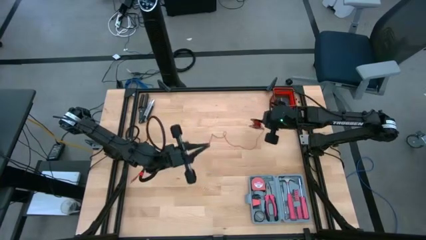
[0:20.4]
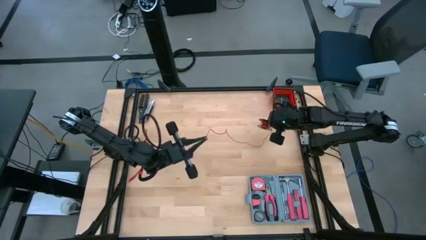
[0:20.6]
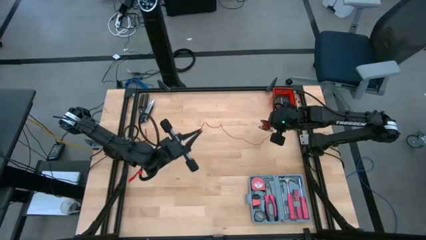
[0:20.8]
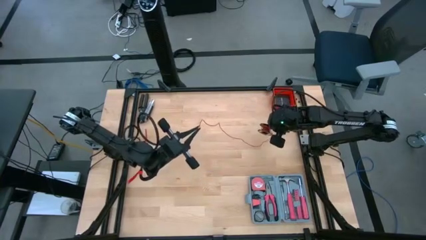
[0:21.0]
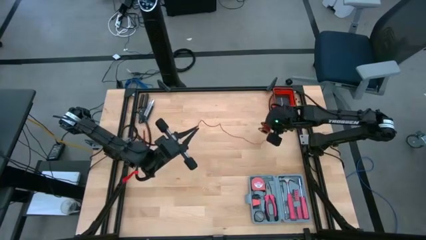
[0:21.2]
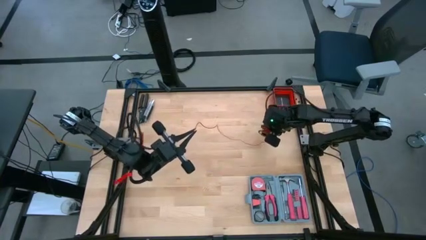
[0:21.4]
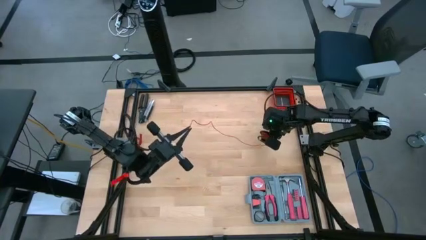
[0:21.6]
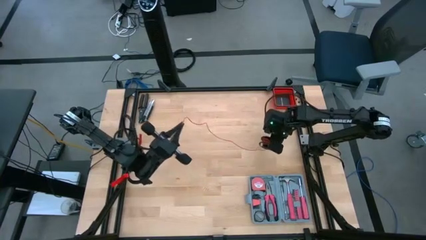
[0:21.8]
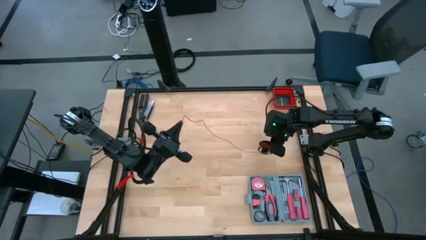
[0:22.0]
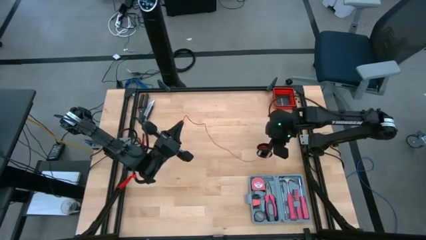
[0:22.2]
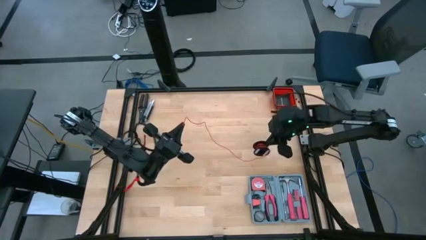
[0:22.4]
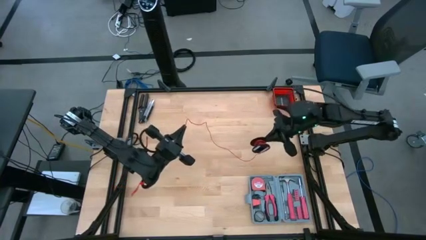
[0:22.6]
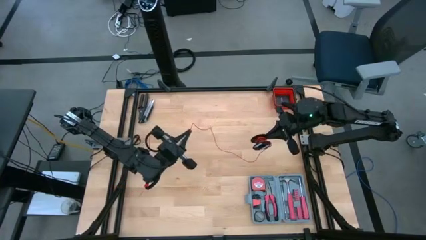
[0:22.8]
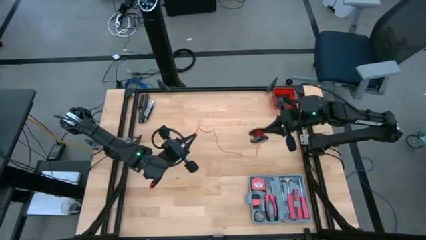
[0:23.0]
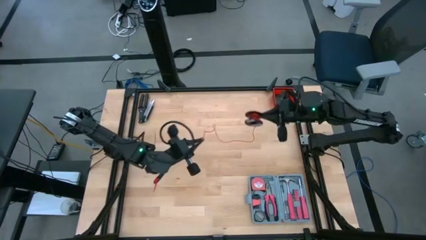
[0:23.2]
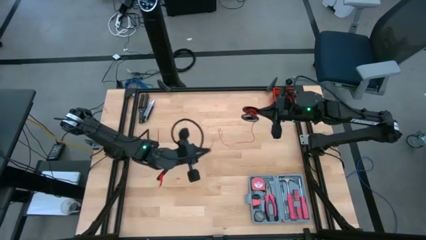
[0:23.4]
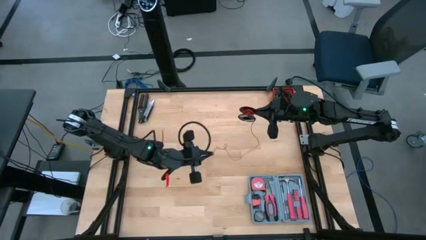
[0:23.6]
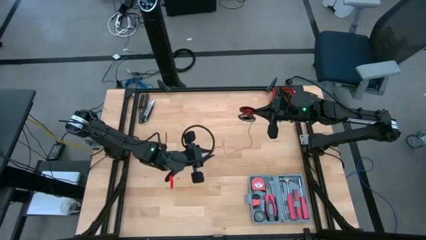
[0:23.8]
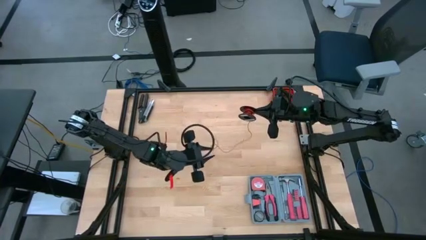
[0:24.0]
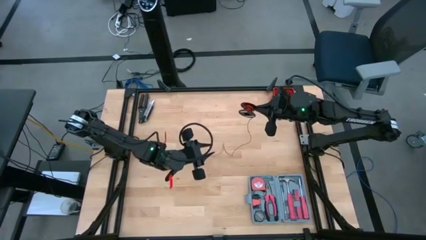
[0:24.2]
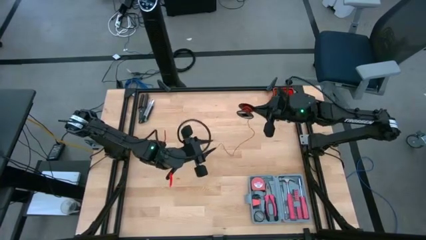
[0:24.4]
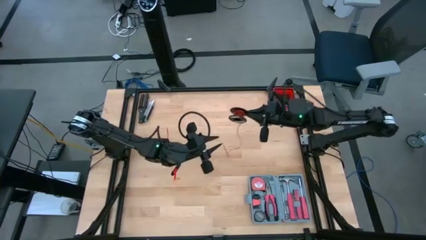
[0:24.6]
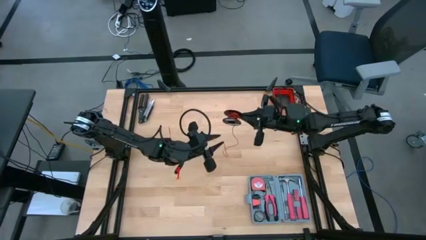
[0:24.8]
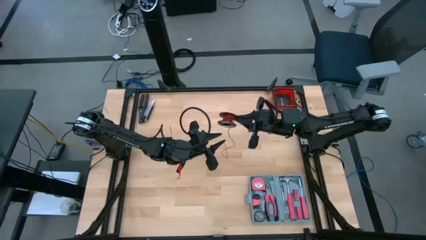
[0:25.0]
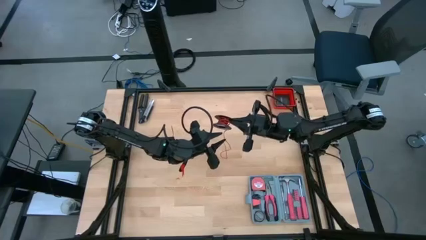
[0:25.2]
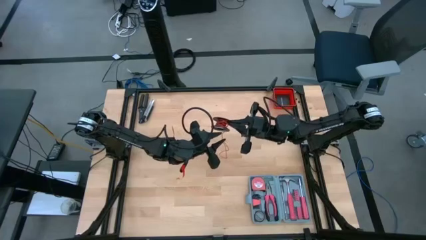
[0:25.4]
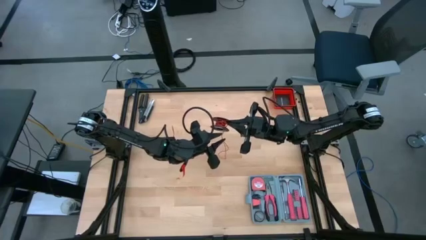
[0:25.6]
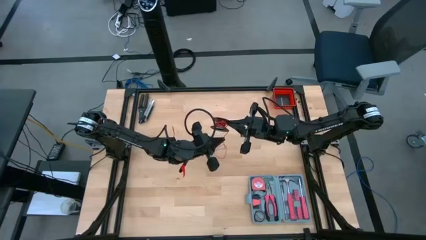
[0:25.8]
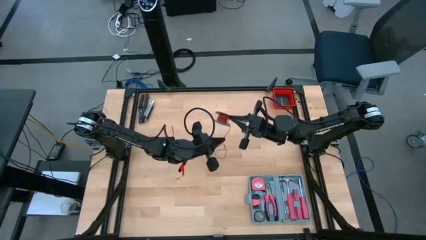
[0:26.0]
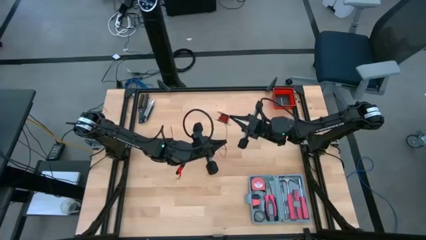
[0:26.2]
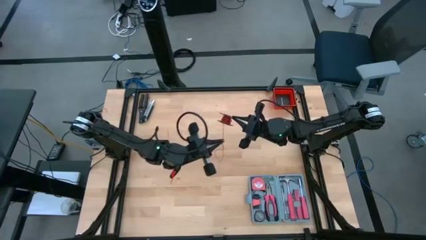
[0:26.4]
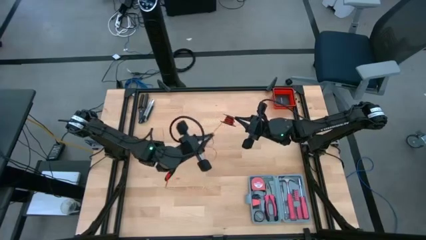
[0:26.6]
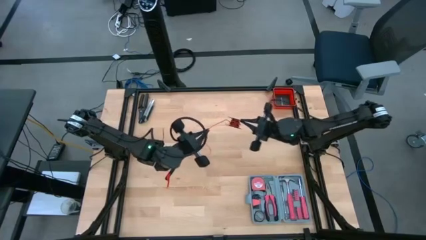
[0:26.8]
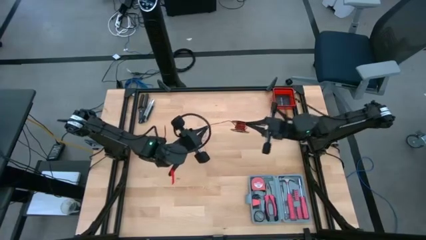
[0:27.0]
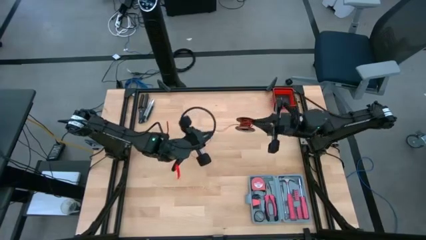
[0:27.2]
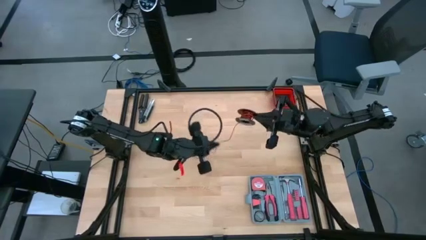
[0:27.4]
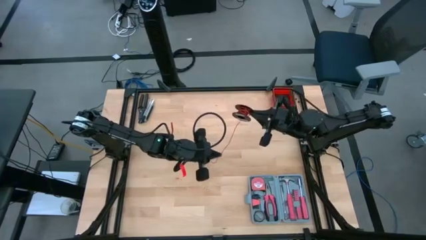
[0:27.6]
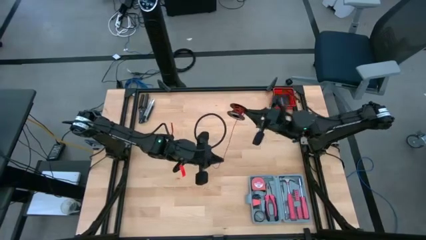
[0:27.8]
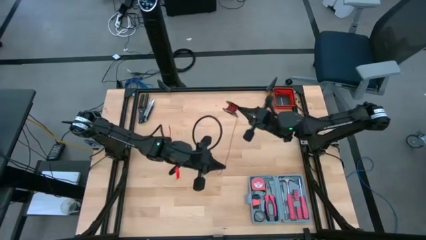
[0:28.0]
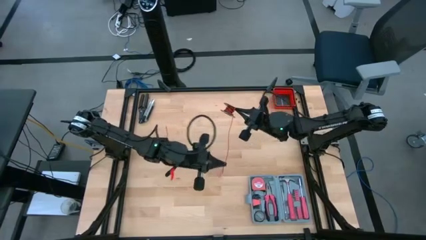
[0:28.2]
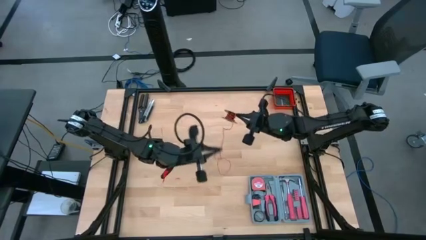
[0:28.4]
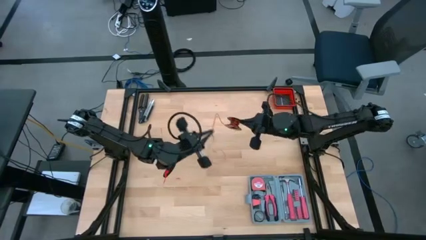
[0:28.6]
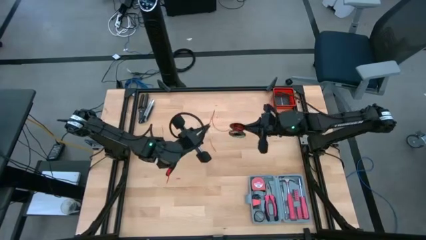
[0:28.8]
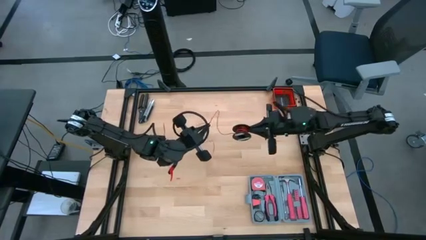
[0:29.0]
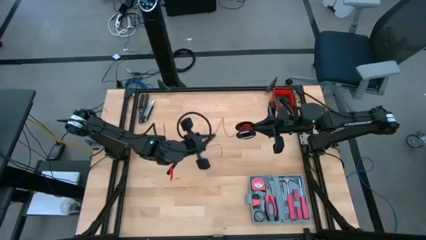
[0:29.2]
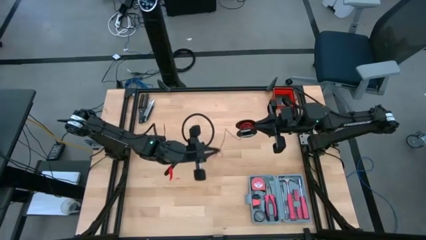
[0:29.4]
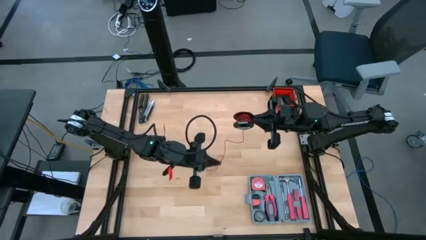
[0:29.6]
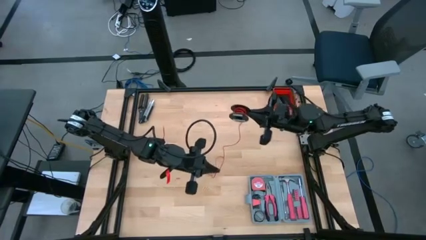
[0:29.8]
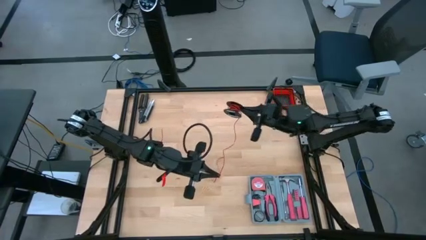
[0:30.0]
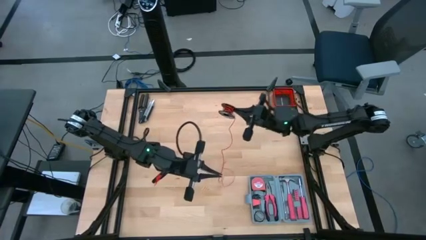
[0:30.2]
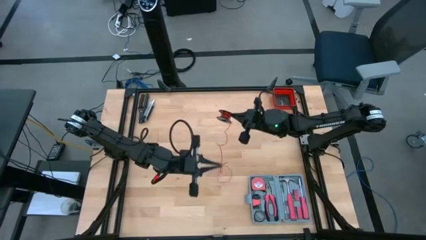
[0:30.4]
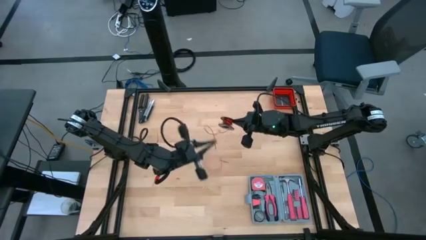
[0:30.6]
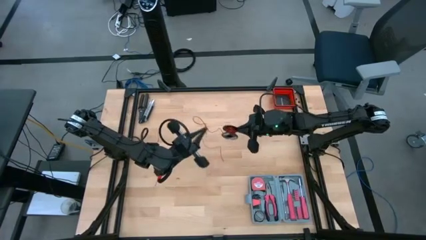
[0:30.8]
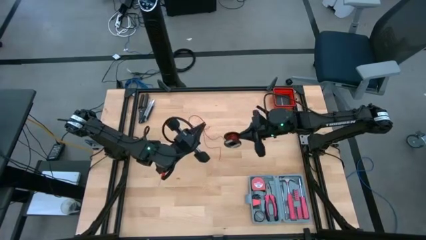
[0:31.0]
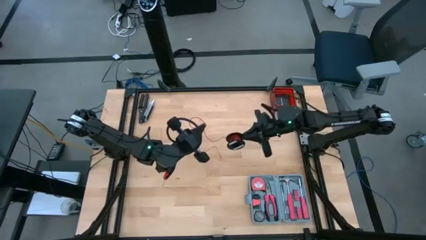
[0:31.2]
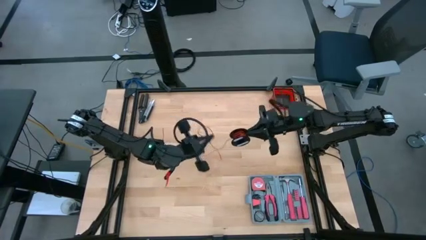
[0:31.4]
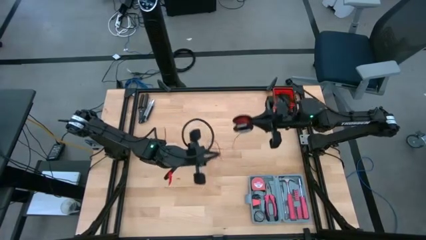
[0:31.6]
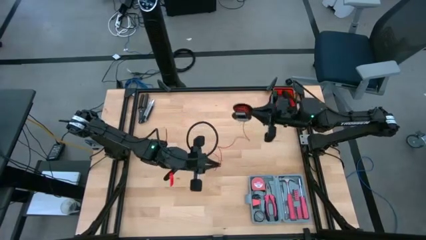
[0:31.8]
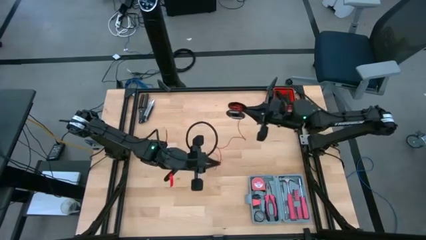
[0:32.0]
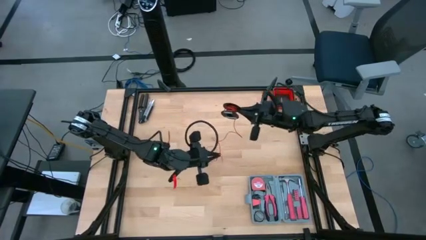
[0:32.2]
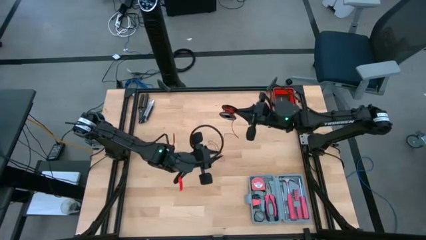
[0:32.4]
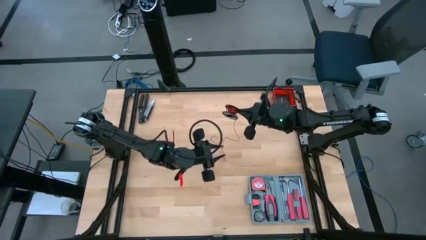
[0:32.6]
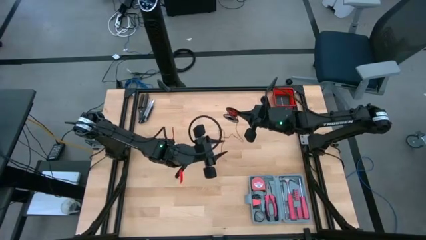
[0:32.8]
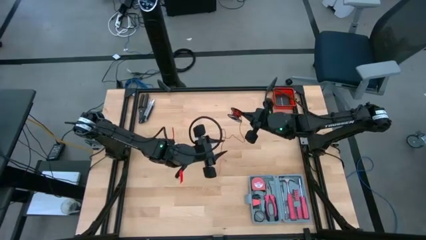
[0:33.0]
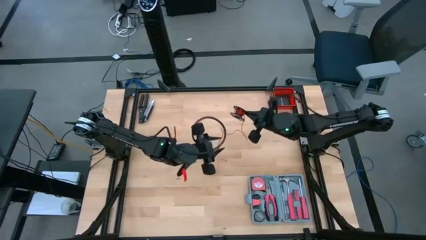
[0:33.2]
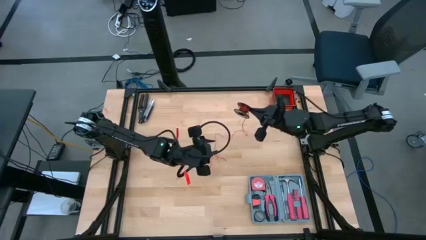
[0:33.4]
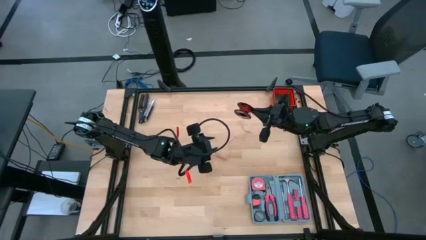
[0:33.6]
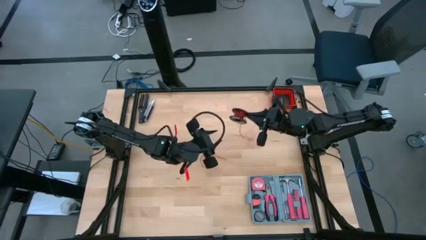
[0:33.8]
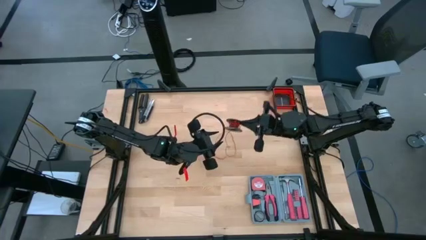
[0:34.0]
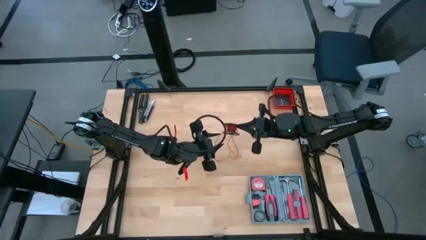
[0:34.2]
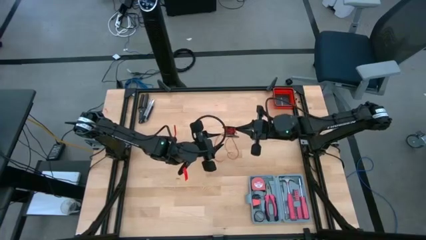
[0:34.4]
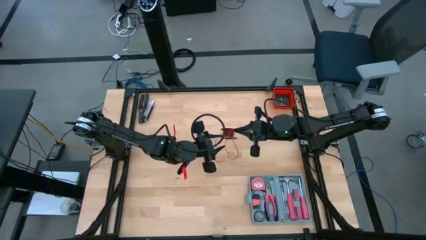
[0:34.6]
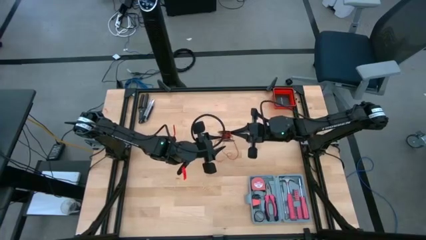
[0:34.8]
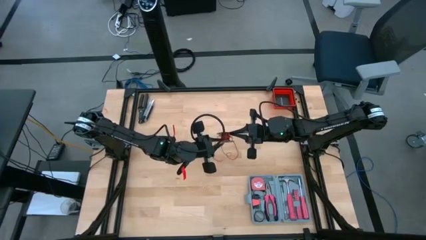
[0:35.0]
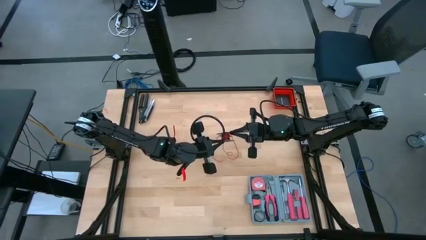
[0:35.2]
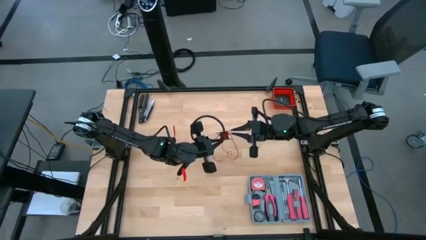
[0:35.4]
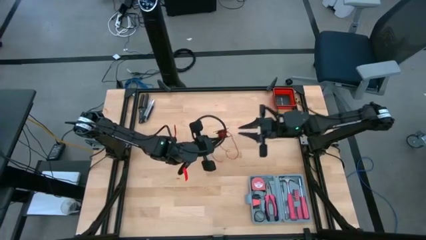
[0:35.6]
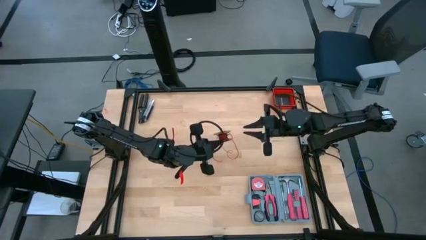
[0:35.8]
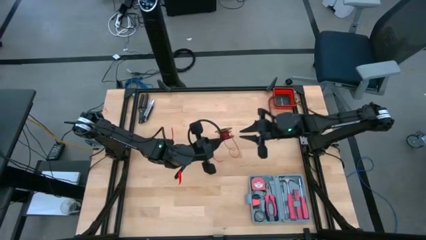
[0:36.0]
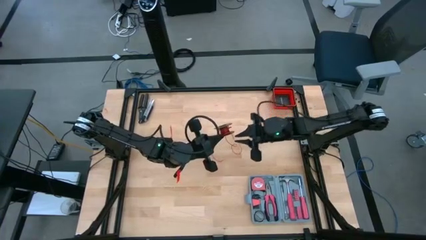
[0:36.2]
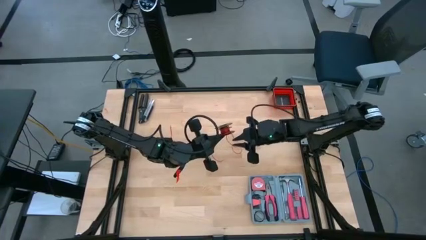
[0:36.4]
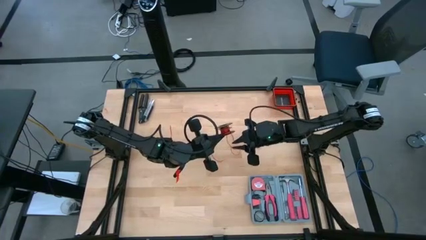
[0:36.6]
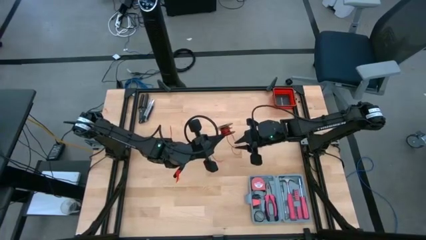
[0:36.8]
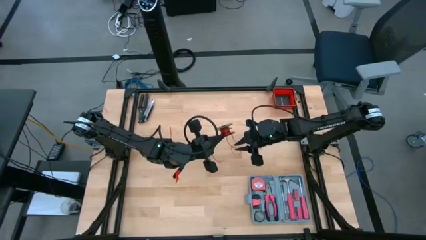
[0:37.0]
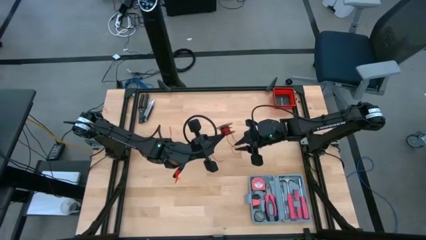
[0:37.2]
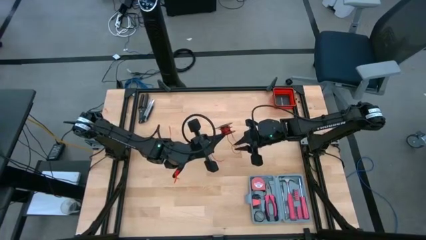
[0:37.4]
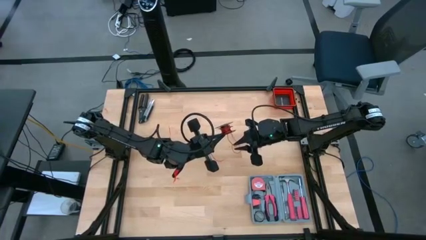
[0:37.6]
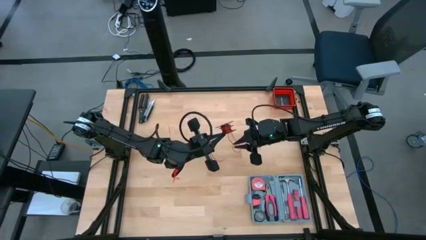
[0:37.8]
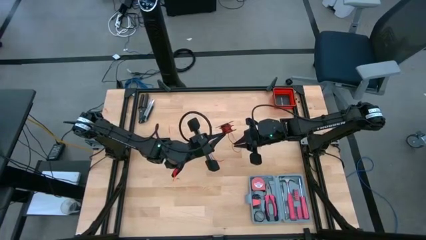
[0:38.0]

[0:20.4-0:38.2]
Task: Coil cords
Uncoil the wire
